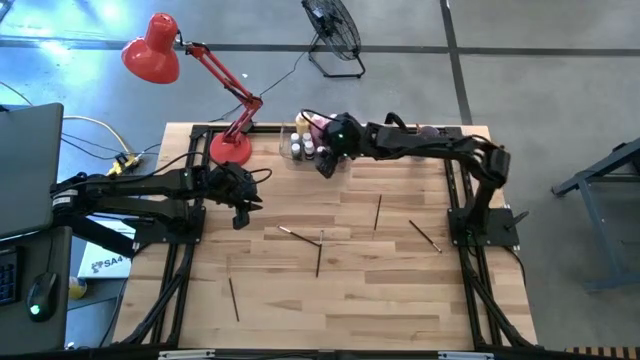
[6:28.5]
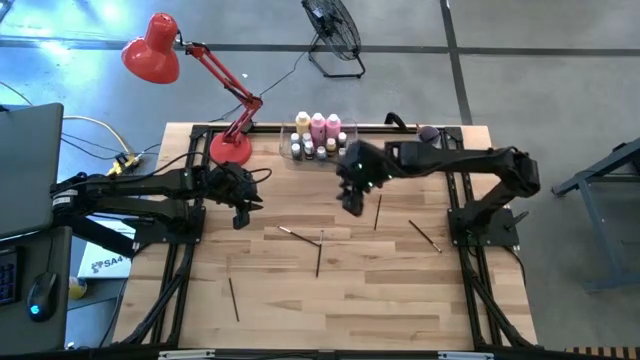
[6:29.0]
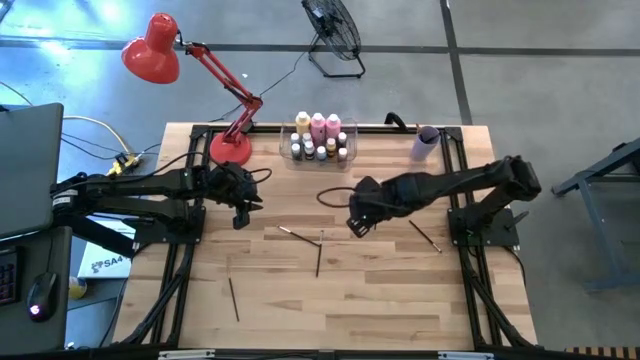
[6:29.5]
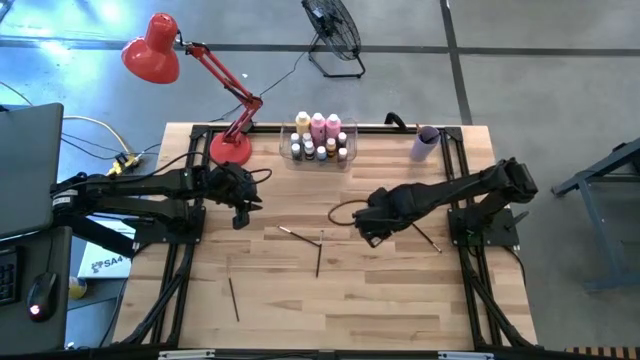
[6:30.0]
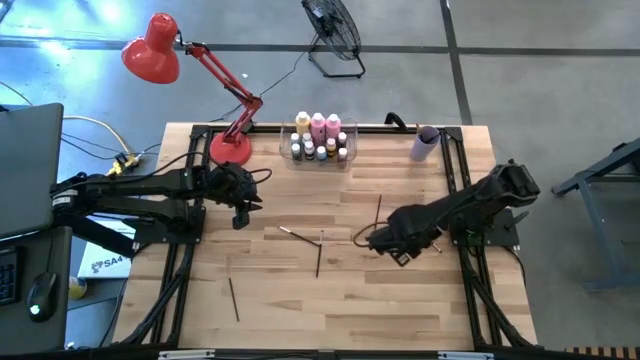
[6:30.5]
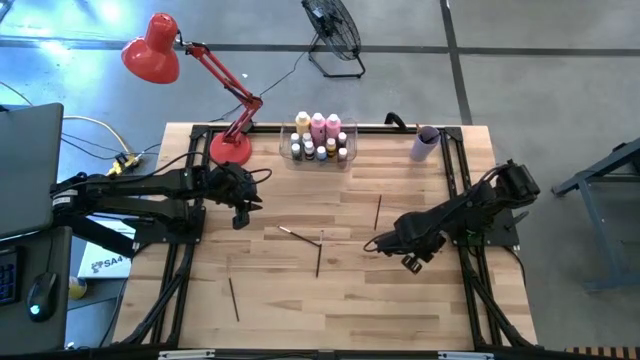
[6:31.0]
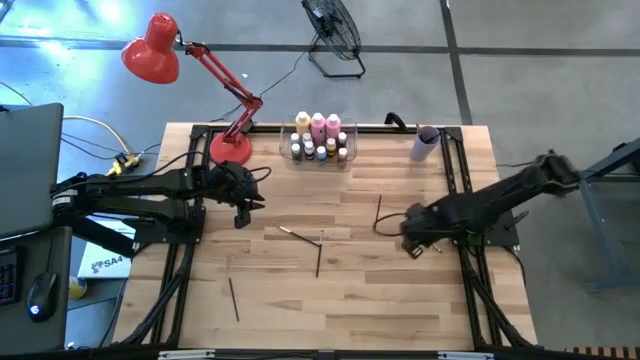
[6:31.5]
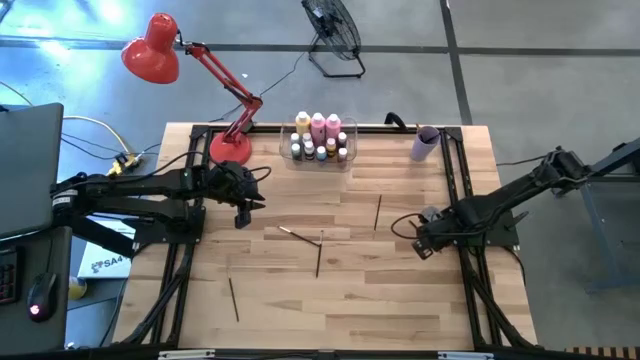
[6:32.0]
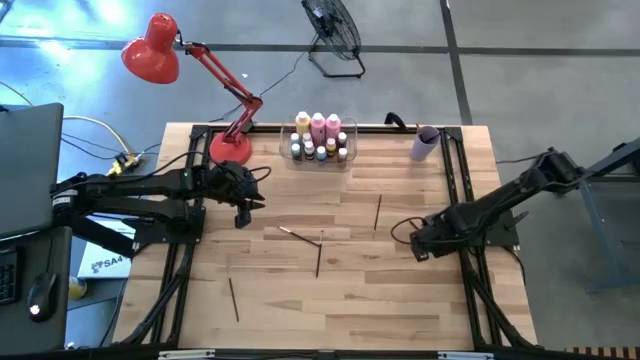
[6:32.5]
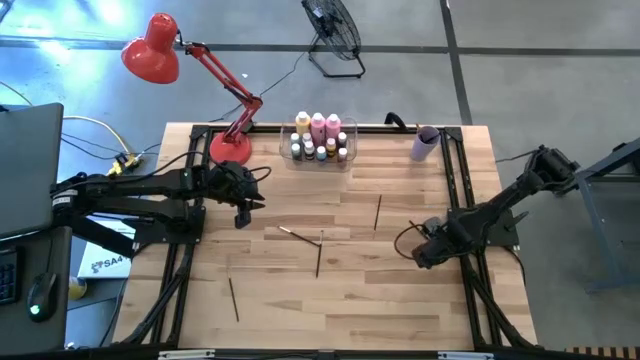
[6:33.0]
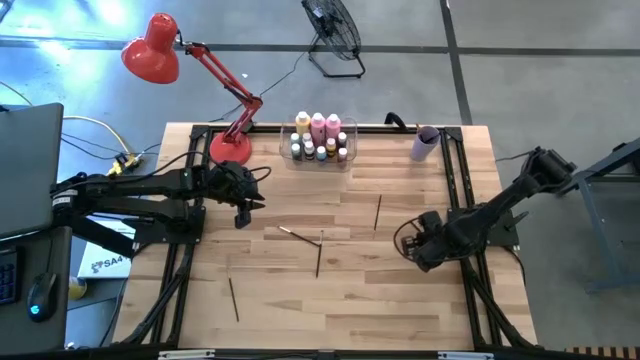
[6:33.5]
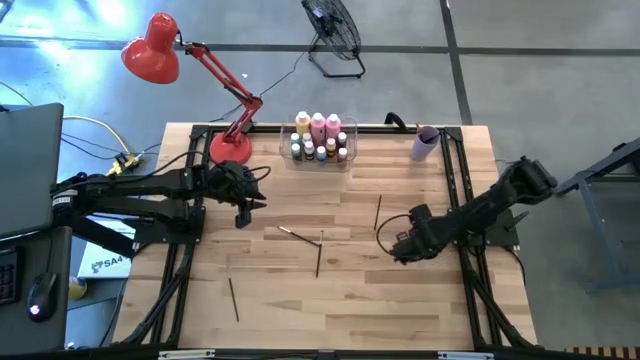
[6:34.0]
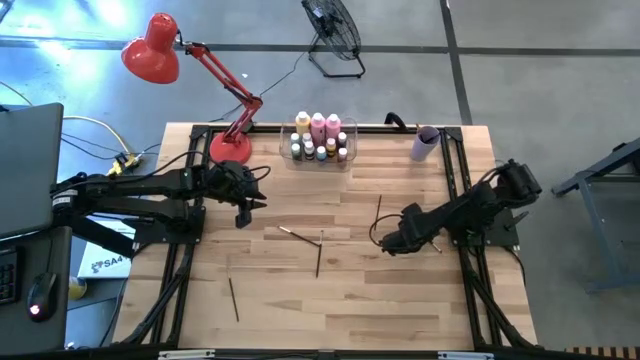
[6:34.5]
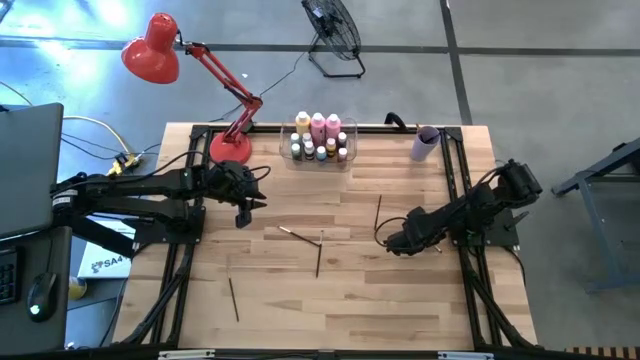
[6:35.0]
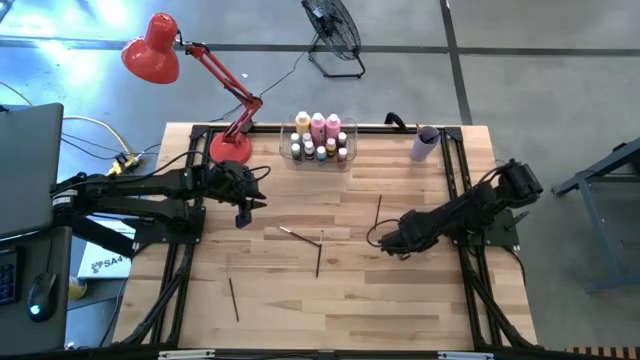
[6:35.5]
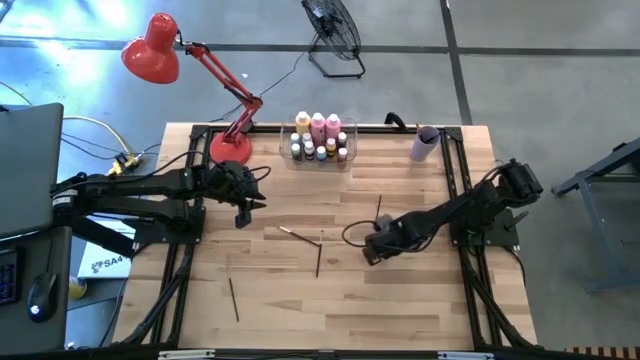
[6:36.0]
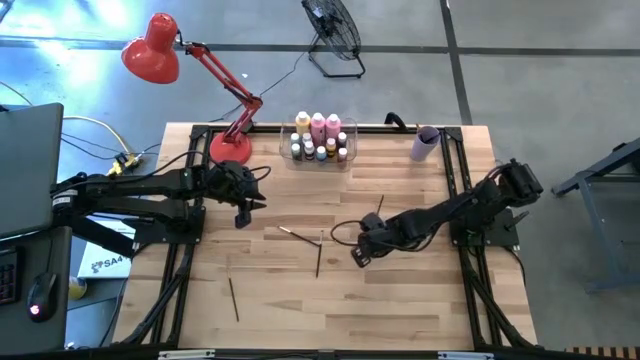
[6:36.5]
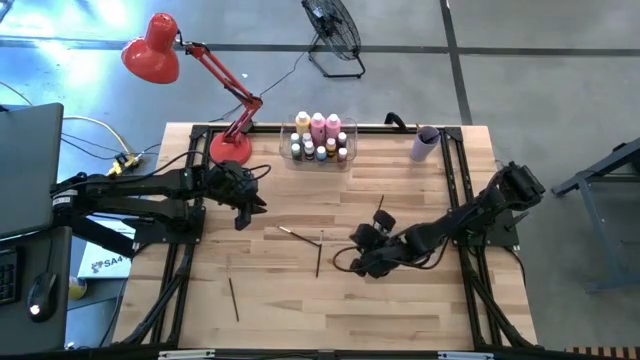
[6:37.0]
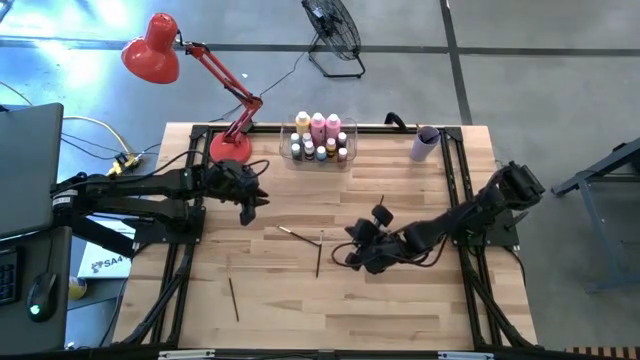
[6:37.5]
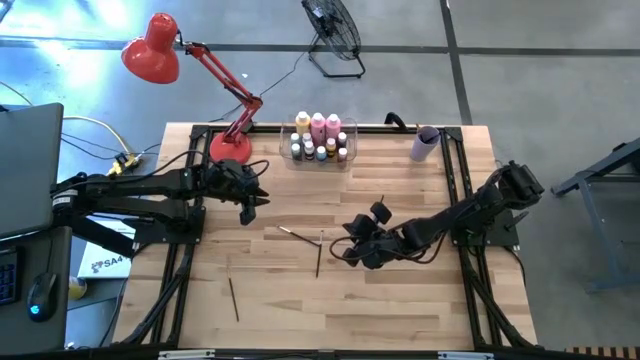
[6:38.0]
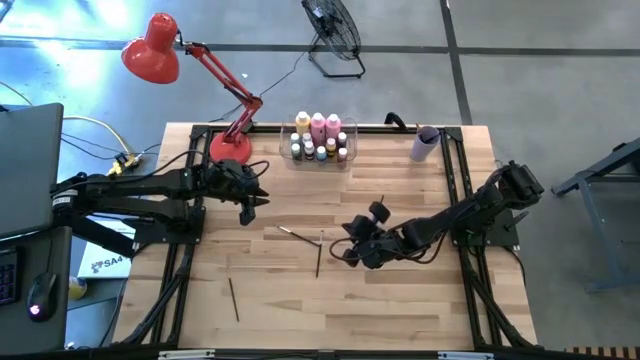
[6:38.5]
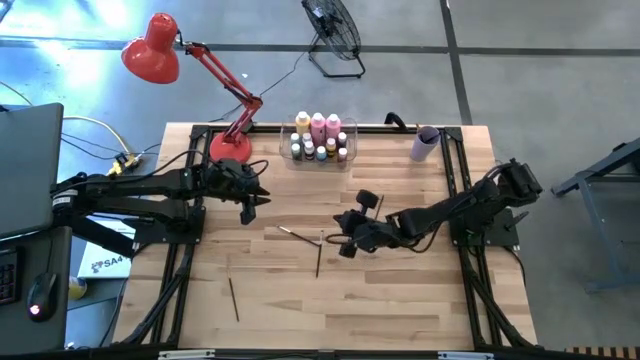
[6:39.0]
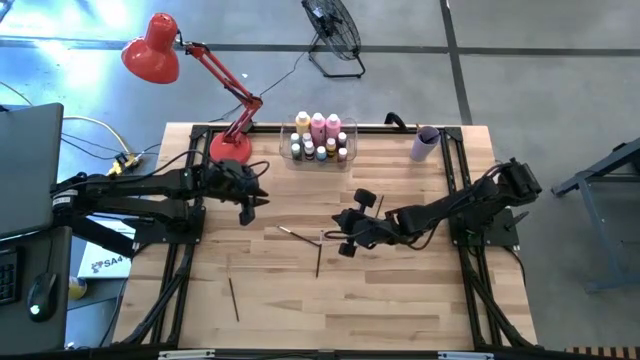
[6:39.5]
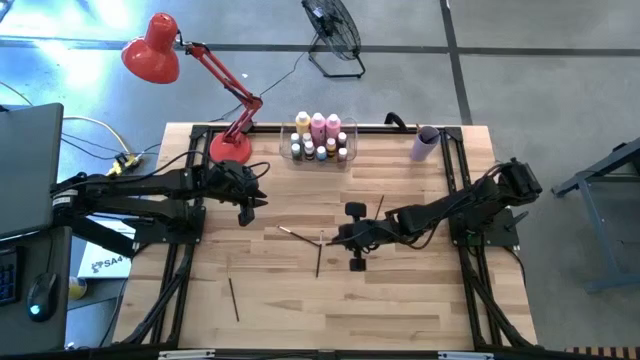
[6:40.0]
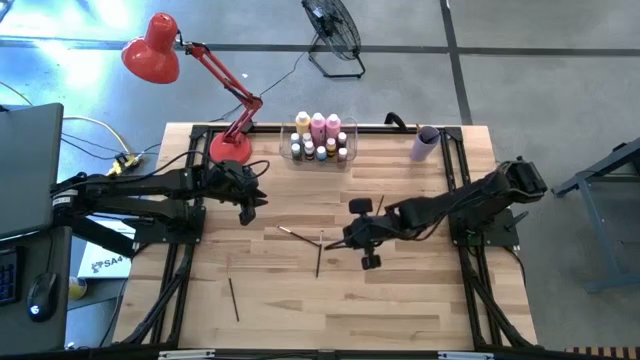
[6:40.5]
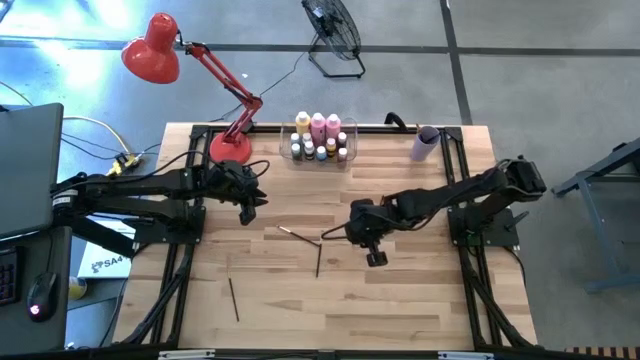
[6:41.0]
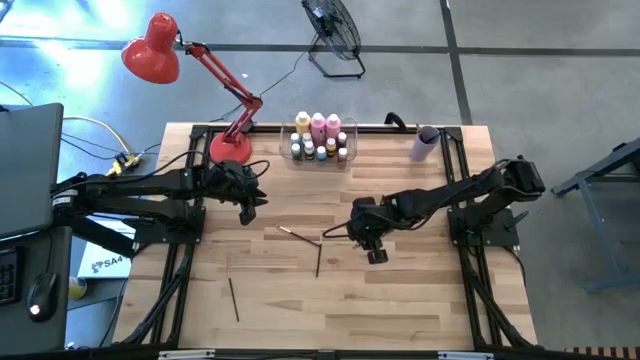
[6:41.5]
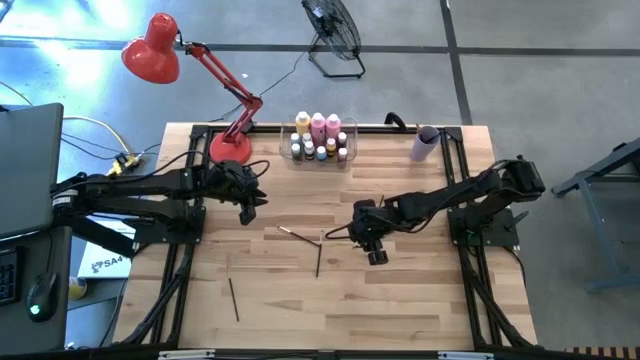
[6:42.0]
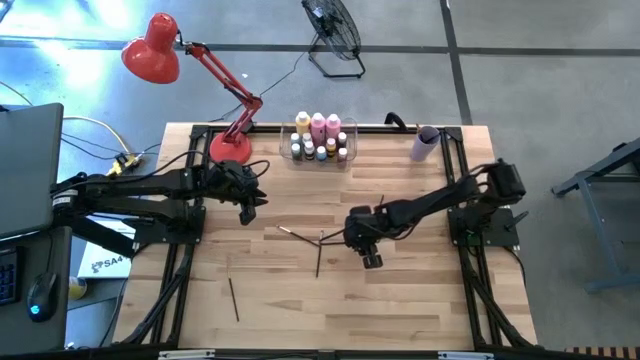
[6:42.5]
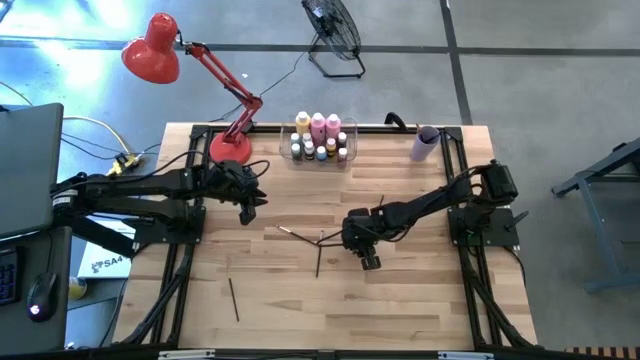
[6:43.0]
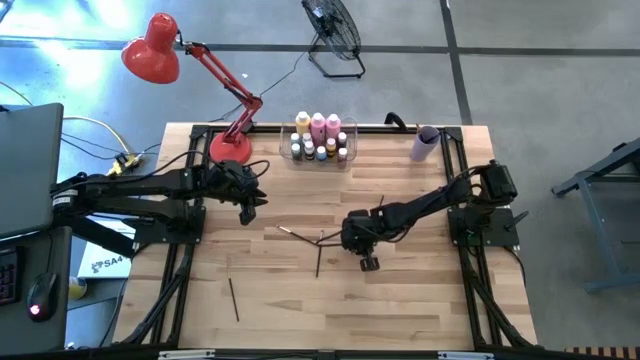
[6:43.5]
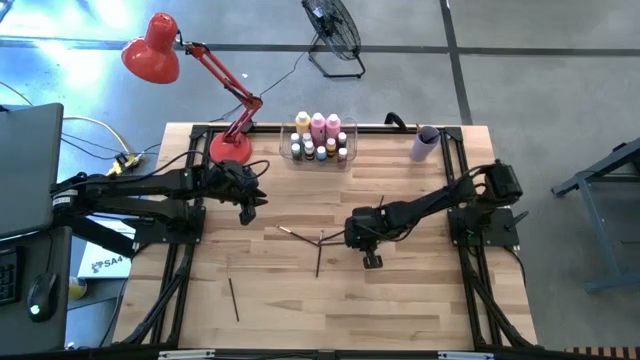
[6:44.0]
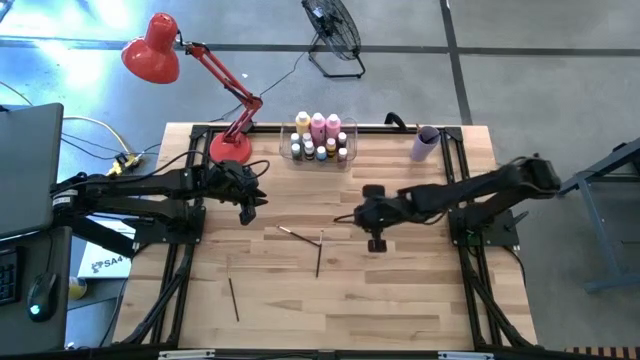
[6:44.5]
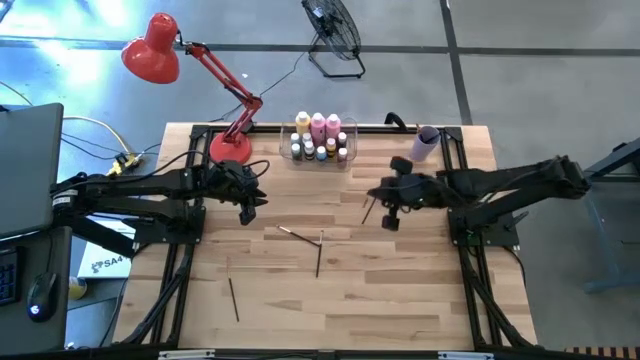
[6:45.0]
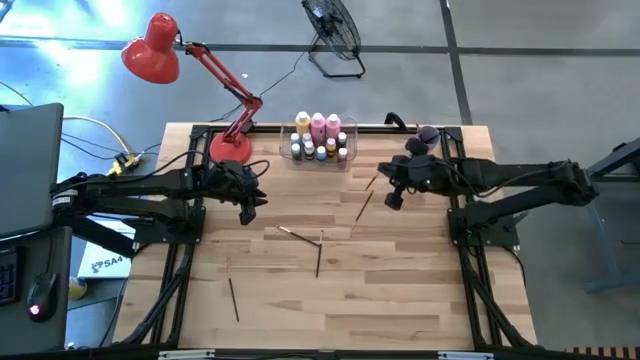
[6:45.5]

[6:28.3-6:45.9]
Task: Pick & Place Paint Supplies
Put the black paint brush into the violet cup

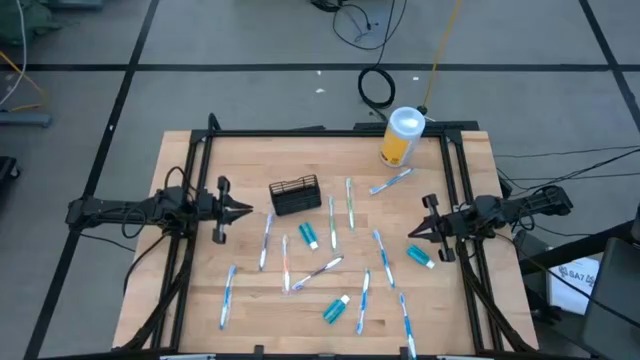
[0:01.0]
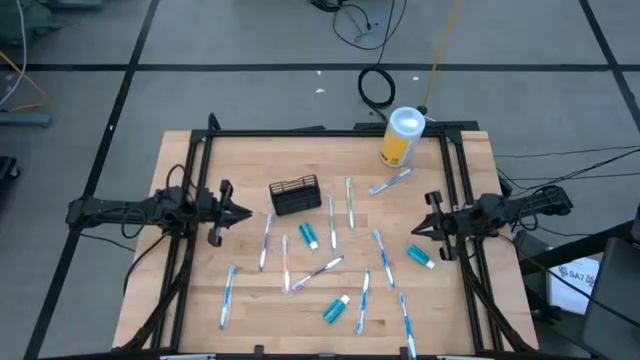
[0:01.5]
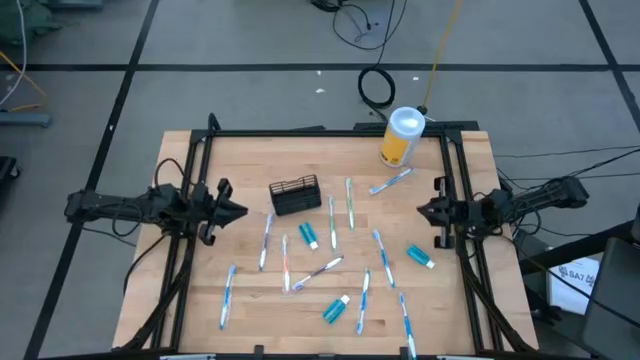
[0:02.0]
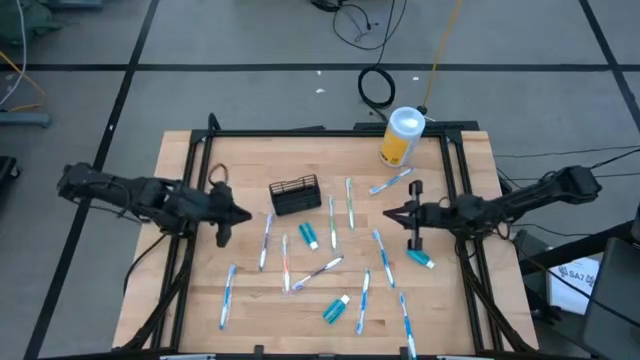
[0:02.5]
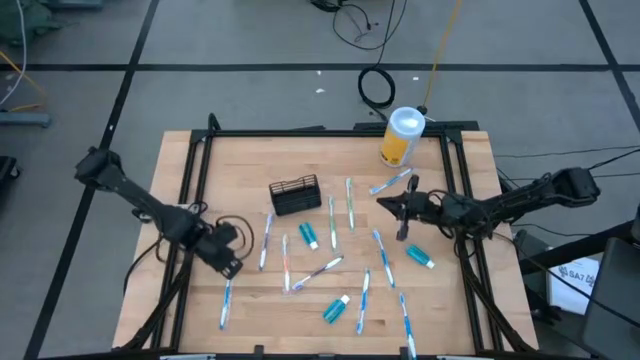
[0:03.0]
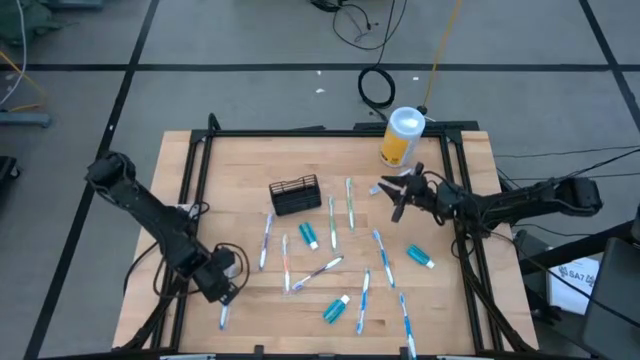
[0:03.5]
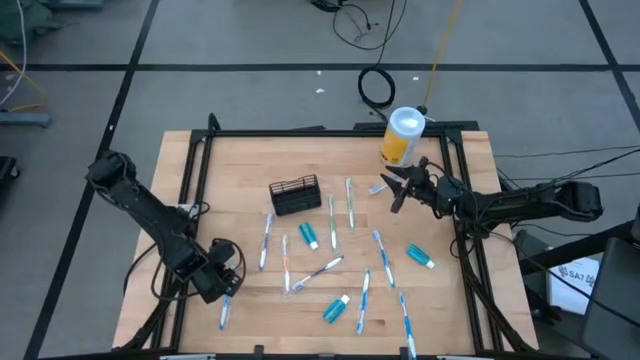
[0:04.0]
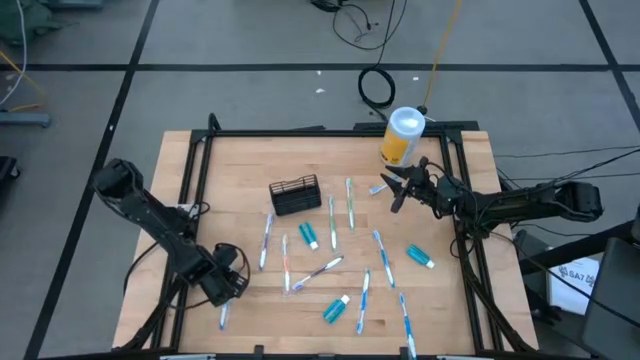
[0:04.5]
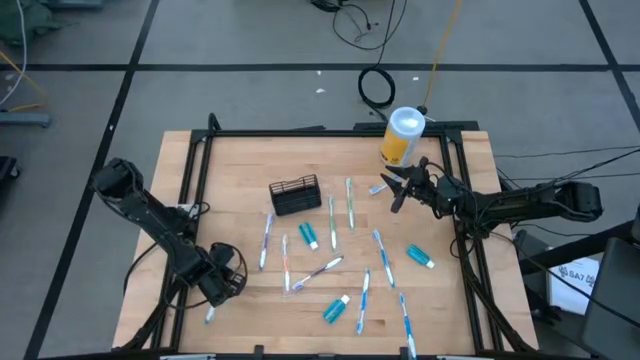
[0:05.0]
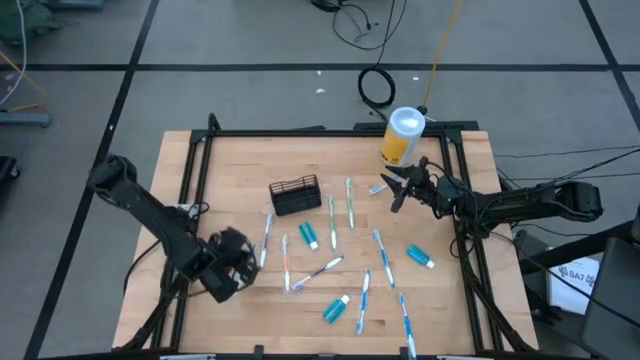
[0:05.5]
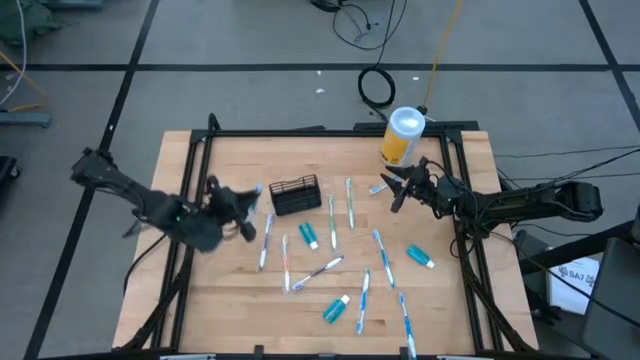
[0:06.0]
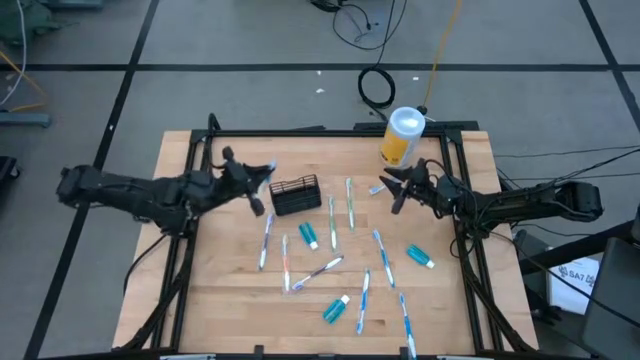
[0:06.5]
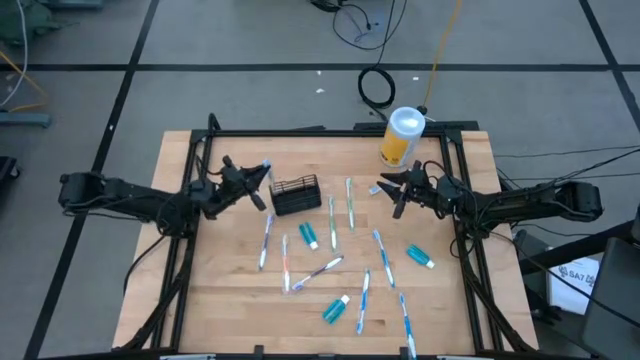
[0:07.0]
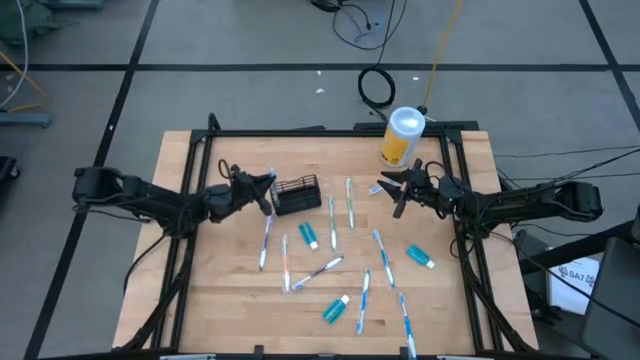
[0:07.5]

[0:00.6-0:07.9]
Task: Pick & Place toothbrushing station
Put the blue toothbrush into the black mesh organizer
